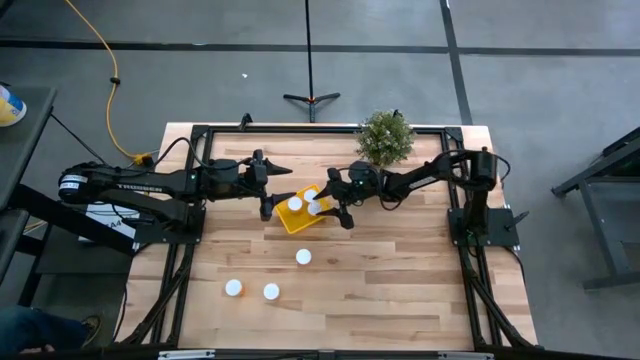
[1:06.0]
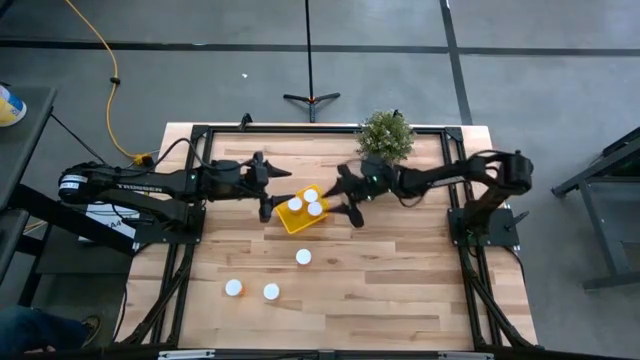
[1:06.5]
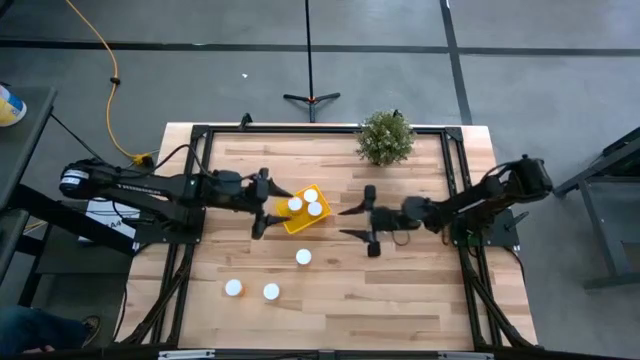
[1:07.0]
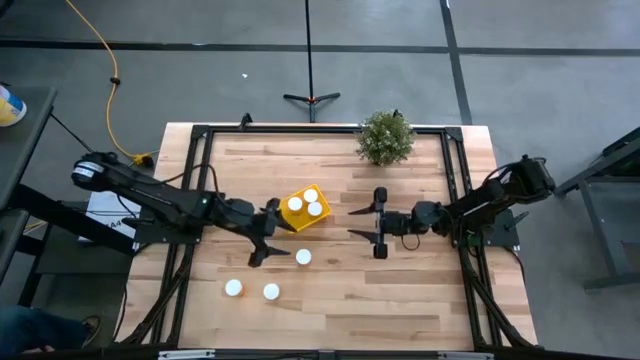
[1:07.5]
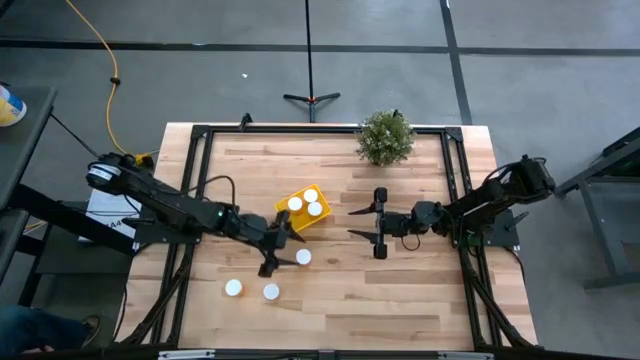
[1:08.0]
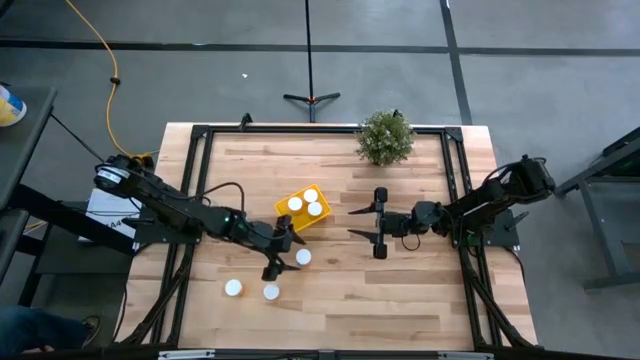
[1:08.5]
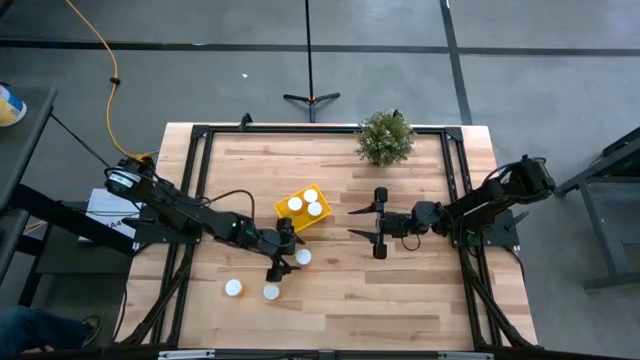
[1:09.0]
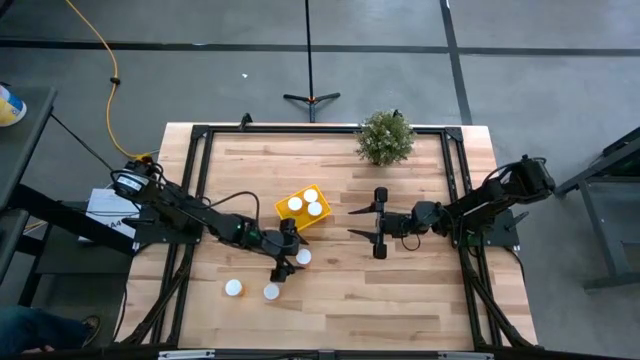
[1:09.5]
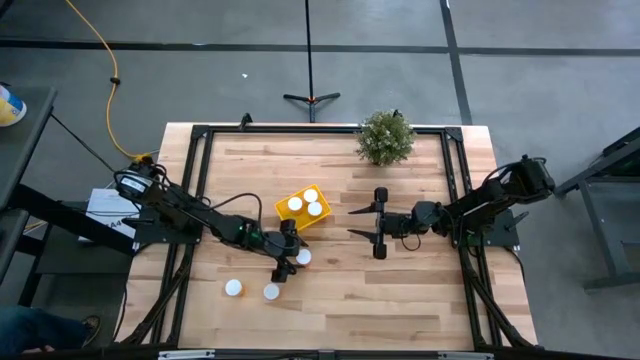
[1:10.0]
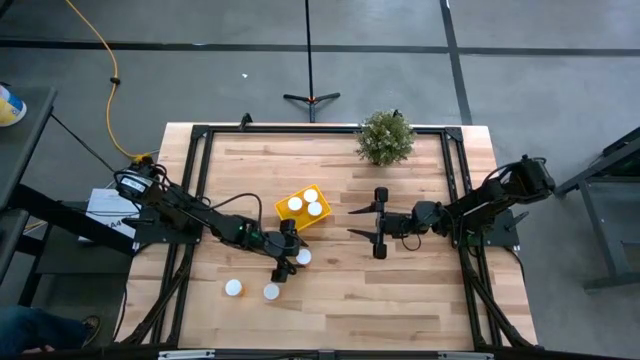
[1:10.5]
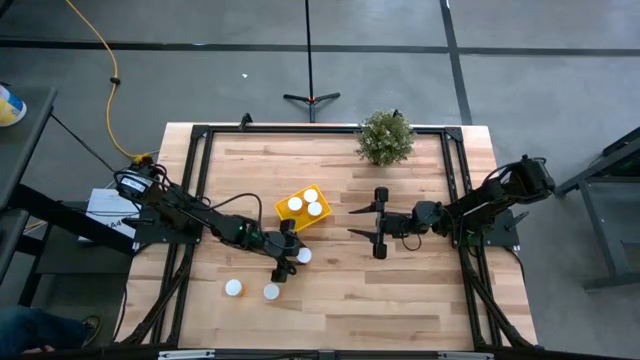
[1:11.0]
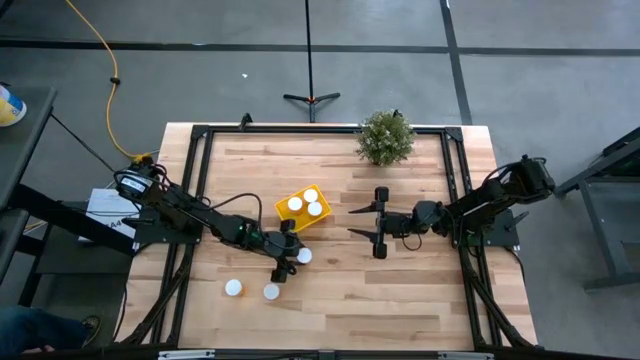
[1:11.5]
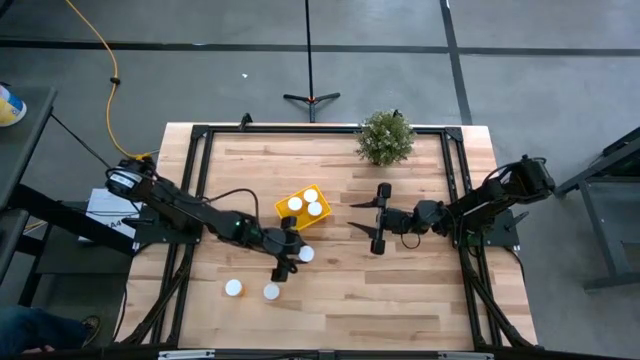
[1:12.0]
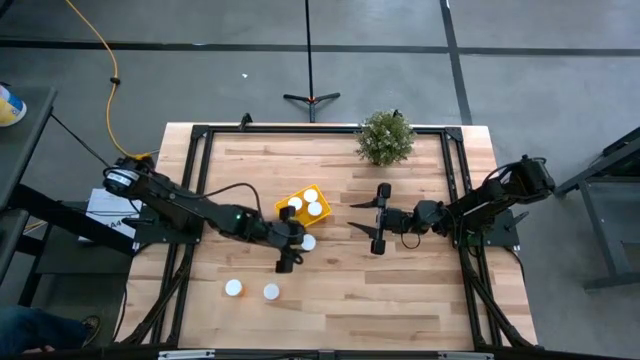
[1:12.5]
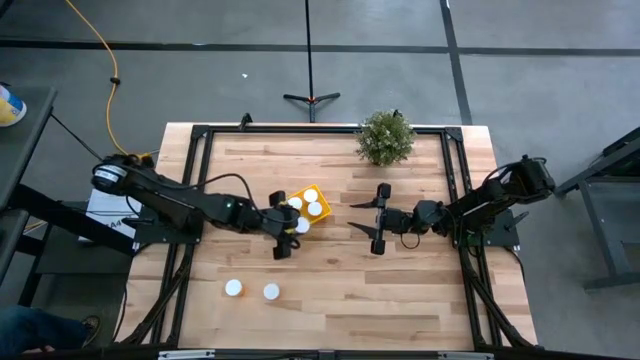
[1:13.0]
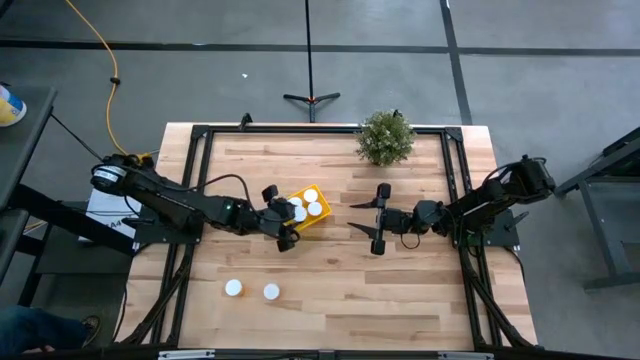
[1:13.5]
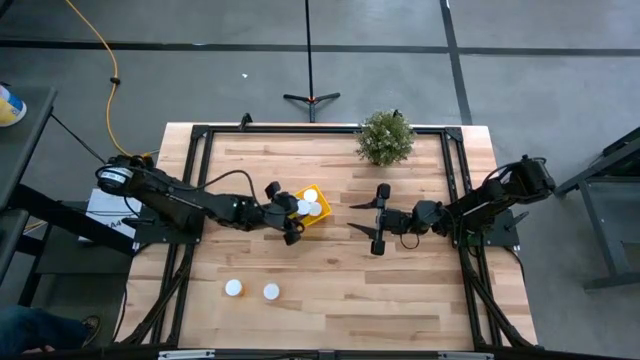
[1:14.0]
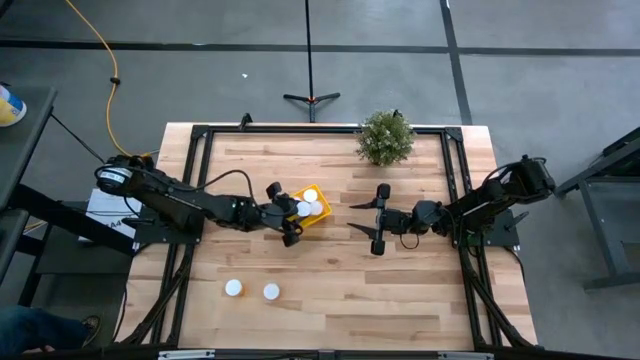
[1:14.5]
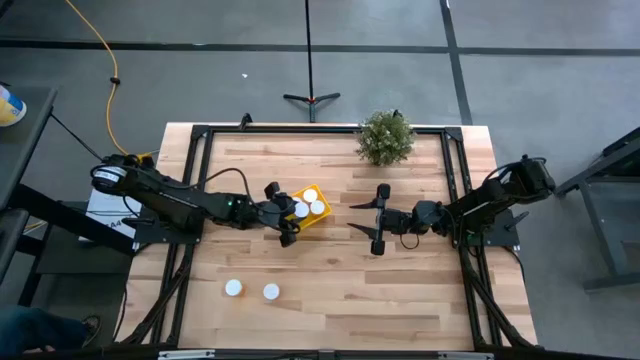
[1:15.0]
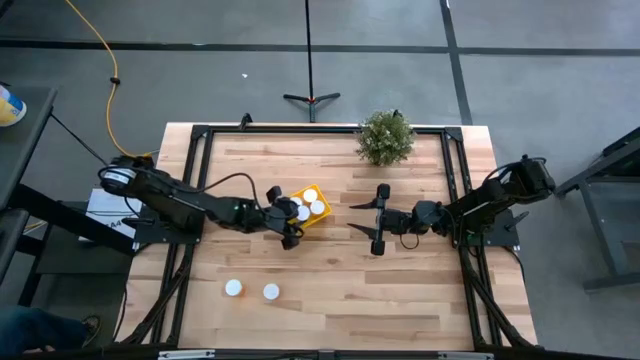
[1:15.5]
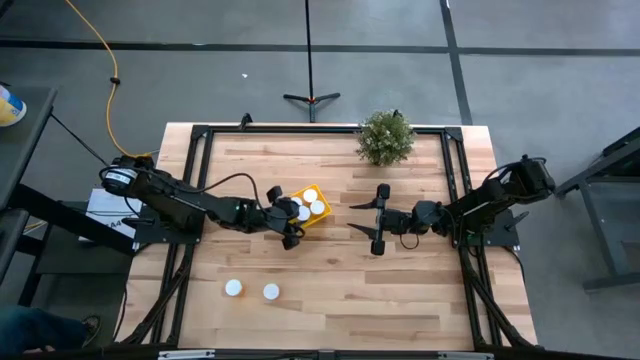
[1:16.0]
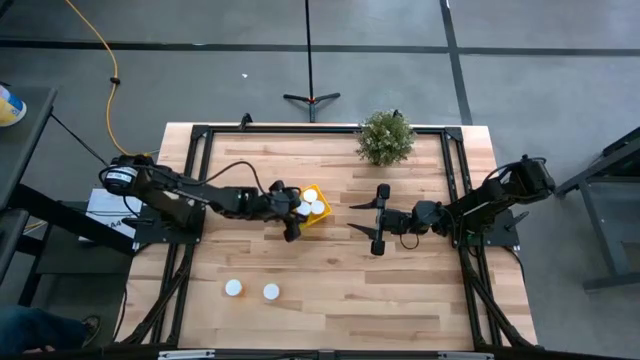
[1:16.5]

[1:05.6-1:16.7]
Task: Pick and place pill bottles into a basket
Put the yellow pill bottle into the bin

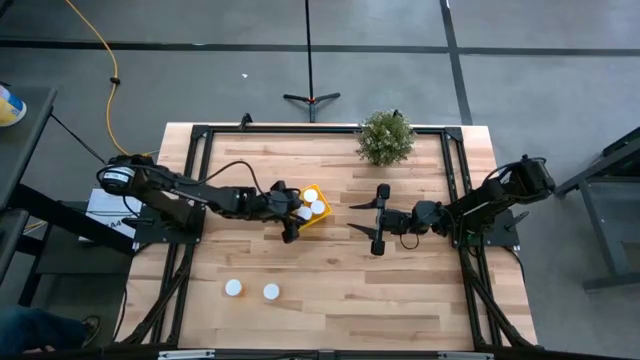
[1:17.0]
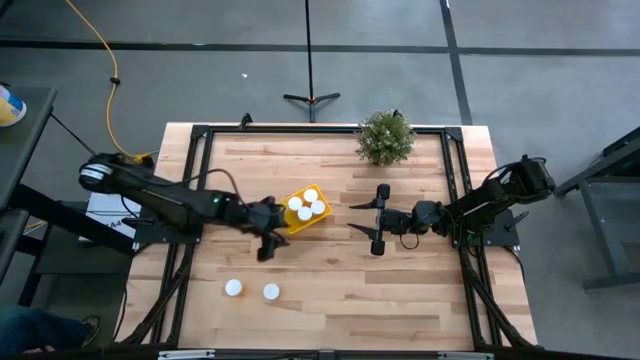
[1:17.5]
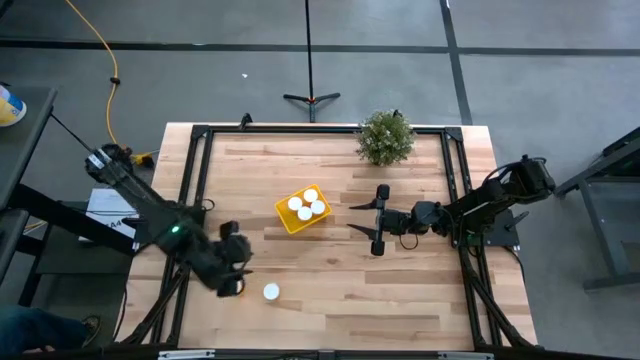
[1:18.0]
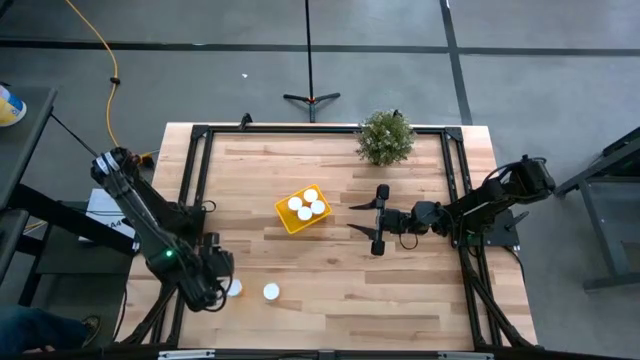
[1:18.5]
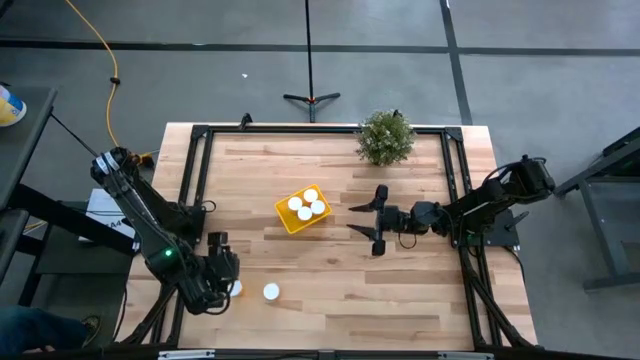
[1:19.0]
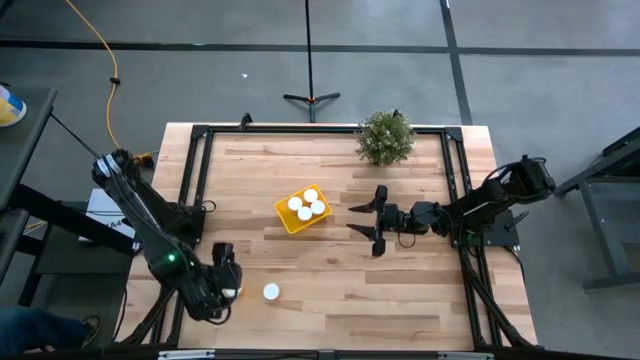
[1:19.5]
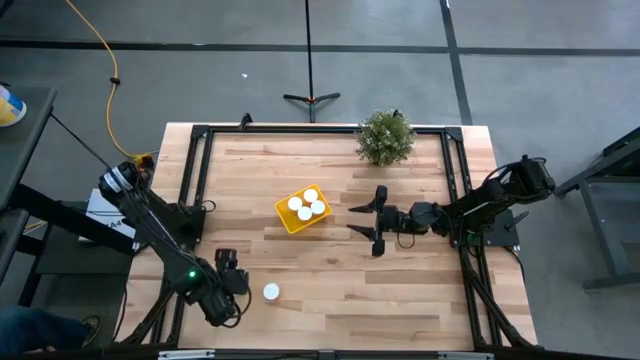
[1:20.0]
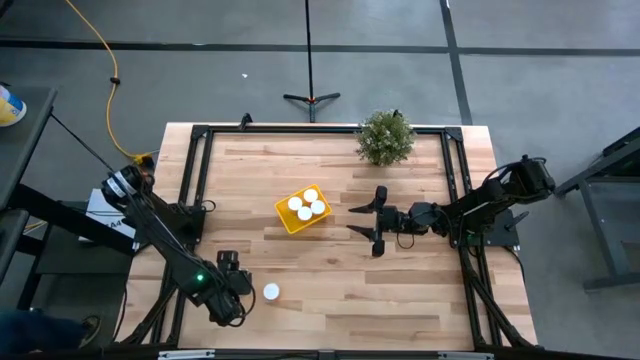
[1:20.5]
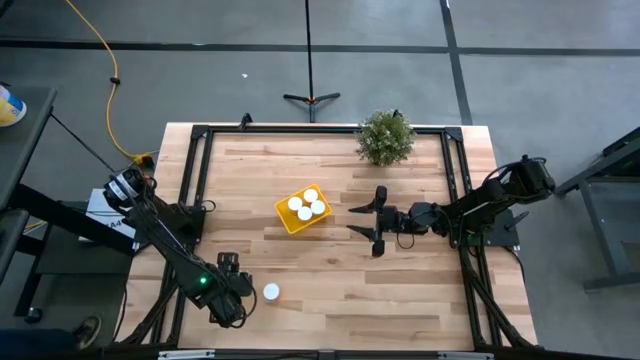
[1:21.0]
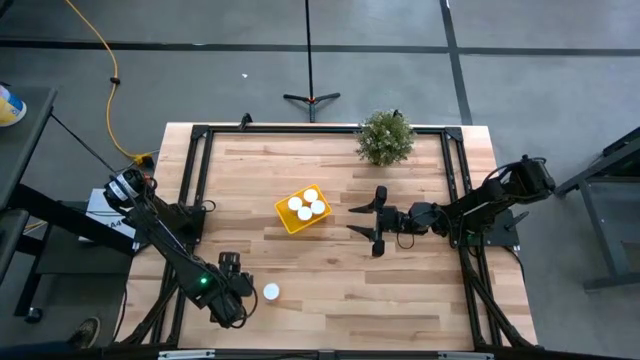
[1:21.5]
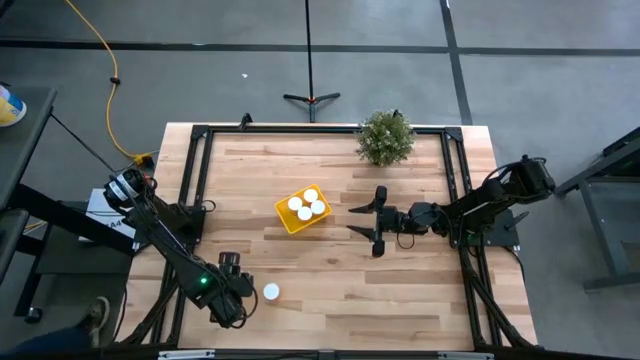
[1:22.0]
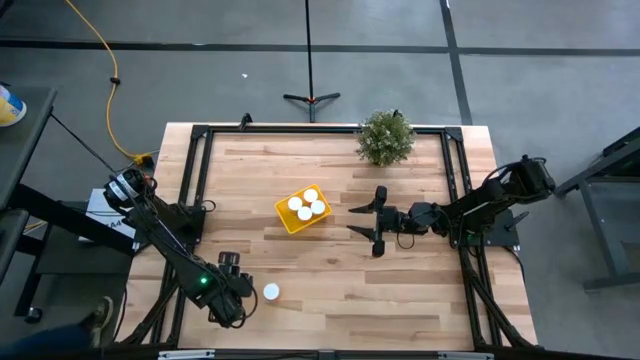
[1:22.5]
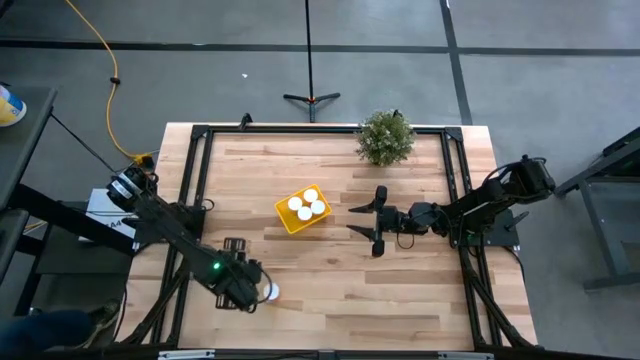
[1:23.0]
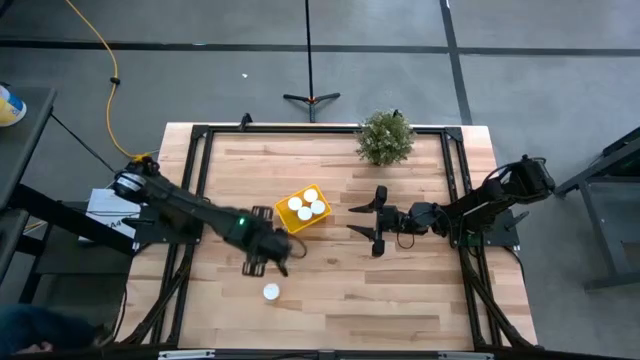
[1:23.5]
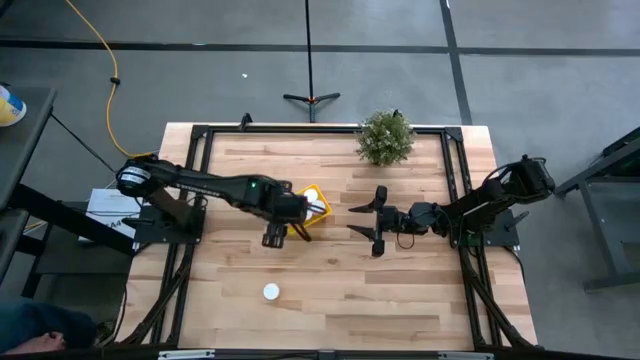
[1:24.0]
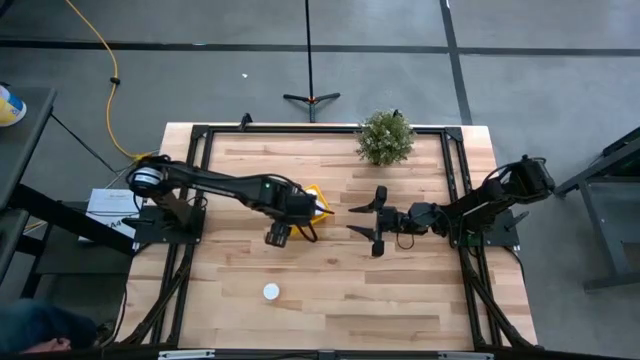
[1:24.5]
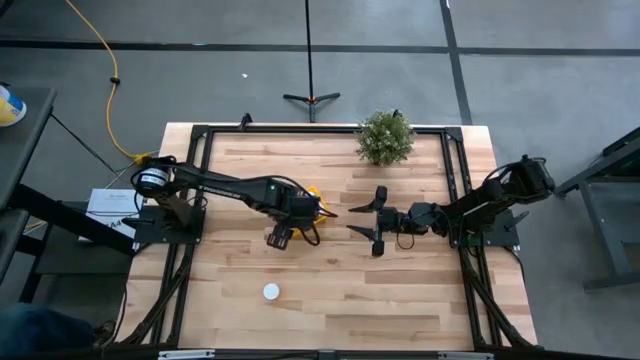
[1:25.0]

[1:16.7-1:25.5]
Put the yellow pill bottle into the bin
